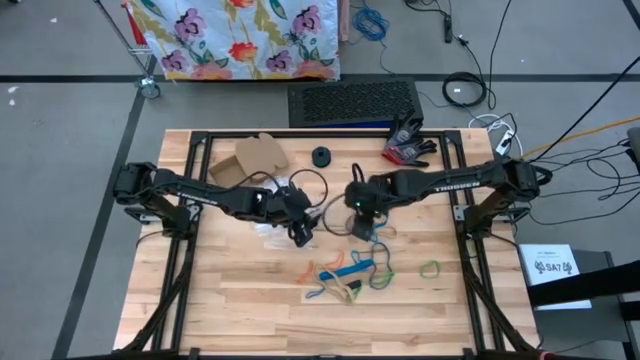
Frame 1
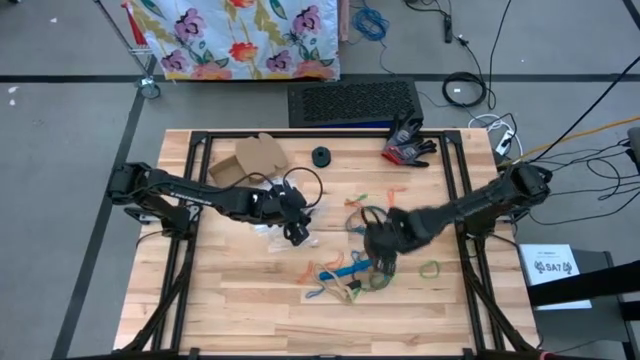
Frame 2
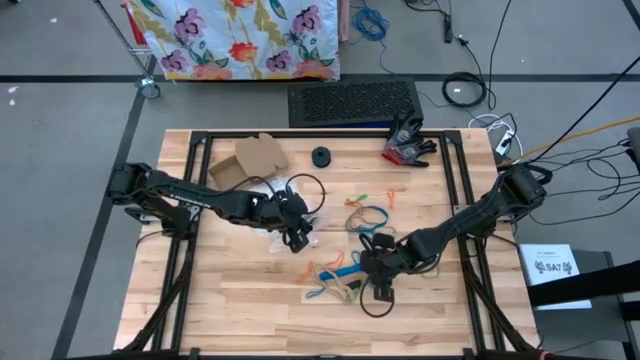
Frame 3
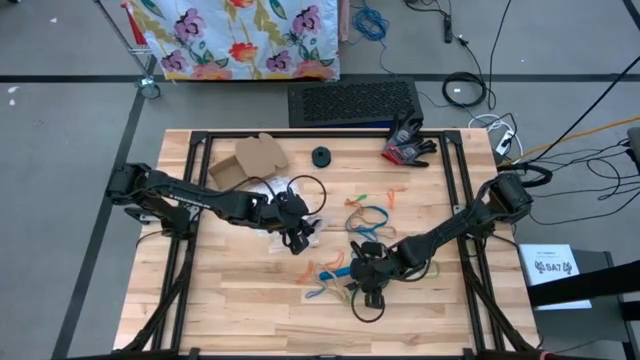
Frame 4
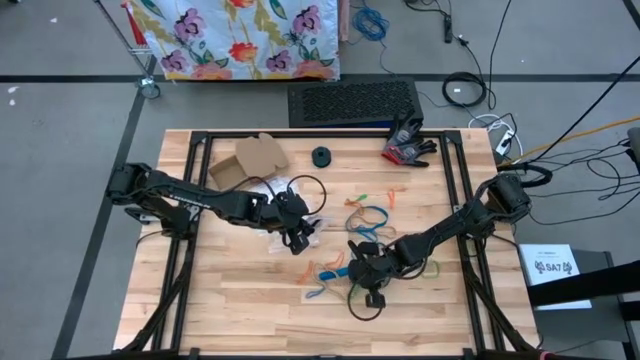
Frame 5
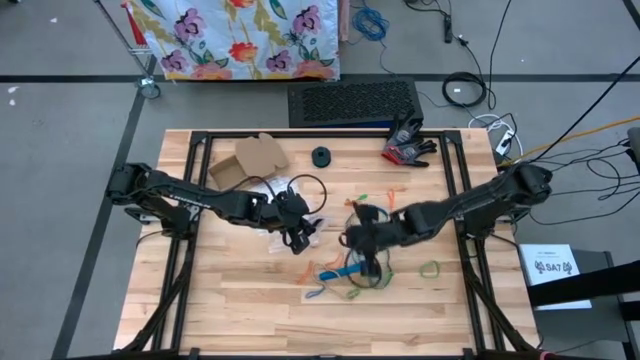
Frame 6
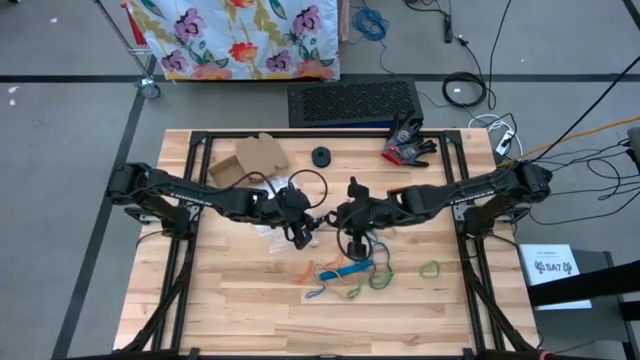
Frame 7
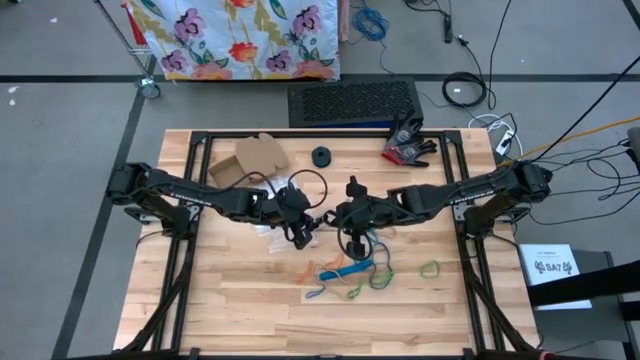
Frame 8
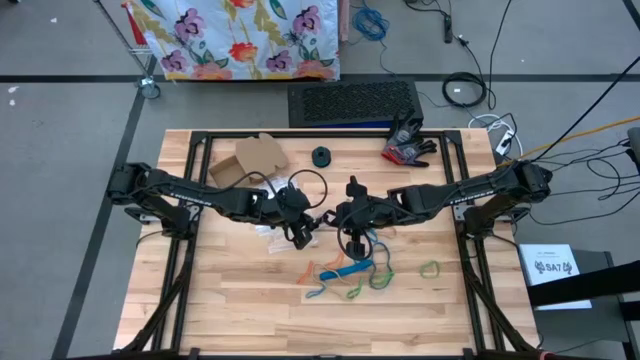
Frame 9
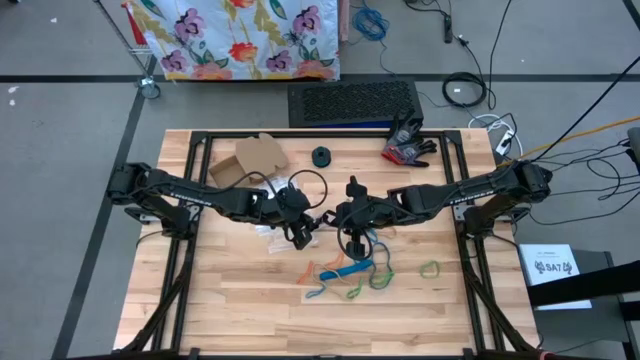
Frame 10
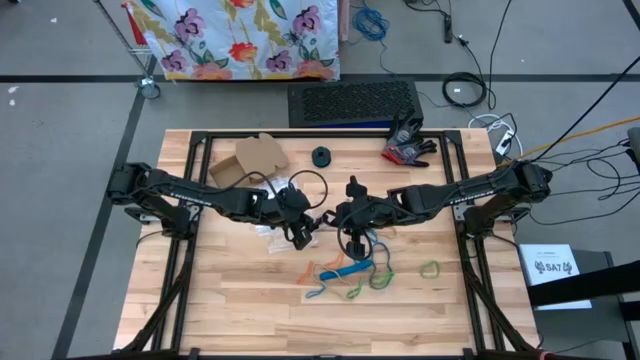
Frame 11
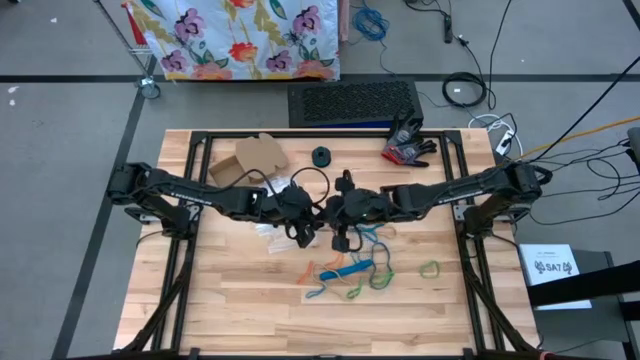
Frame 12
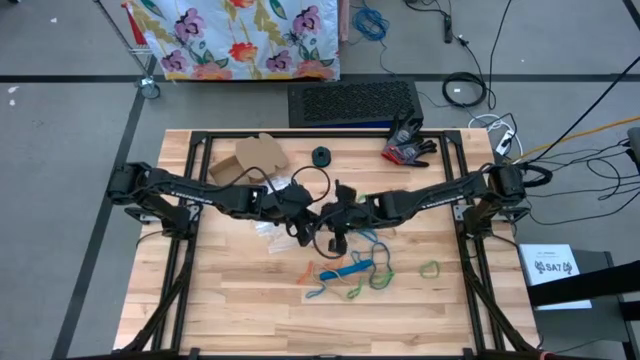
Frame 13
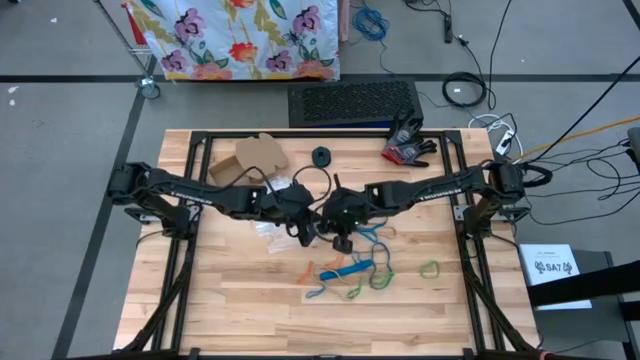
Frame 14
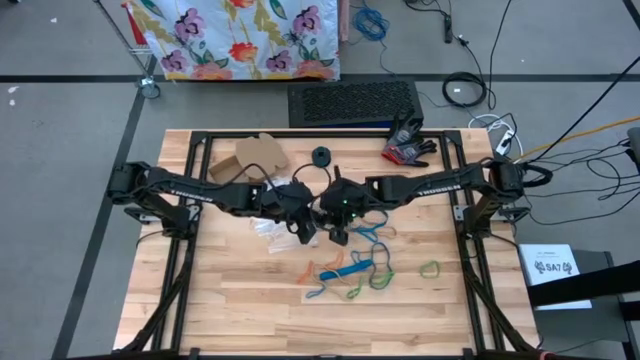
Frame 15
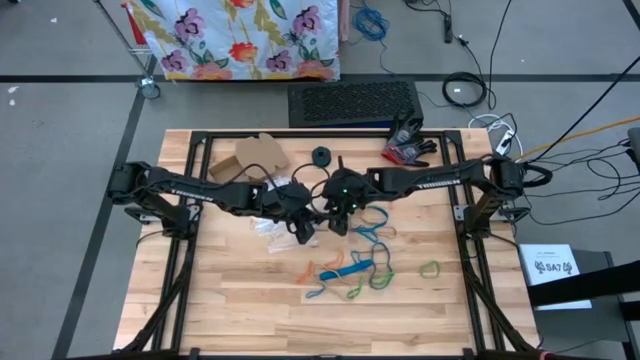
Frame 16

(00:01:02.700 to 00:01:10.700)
Task: Sort rubber bands
Put the black rubber band into the transparent zip bag

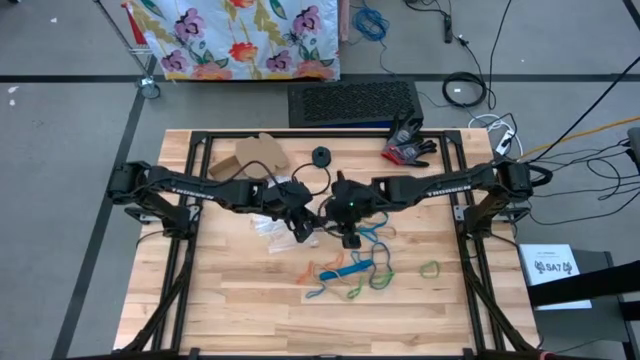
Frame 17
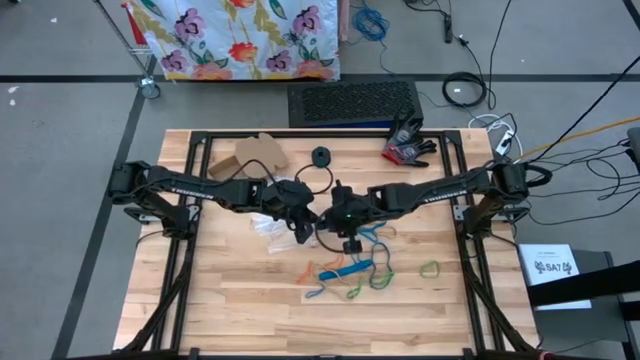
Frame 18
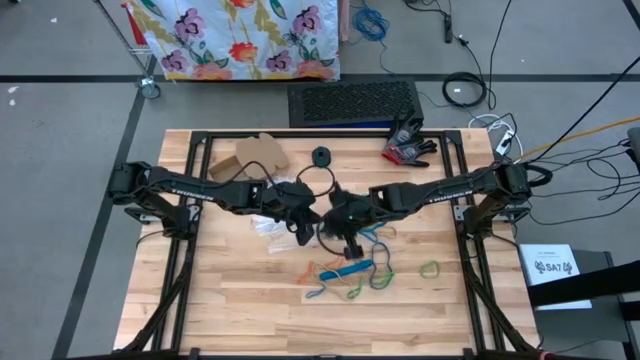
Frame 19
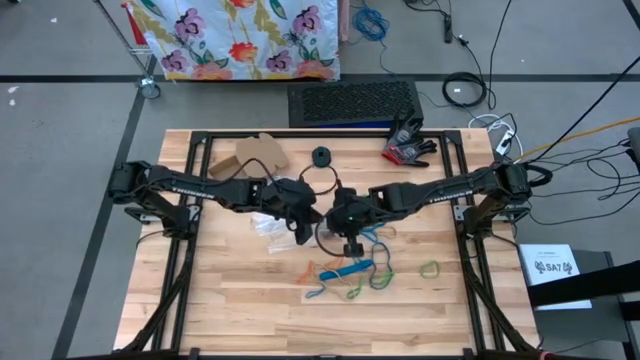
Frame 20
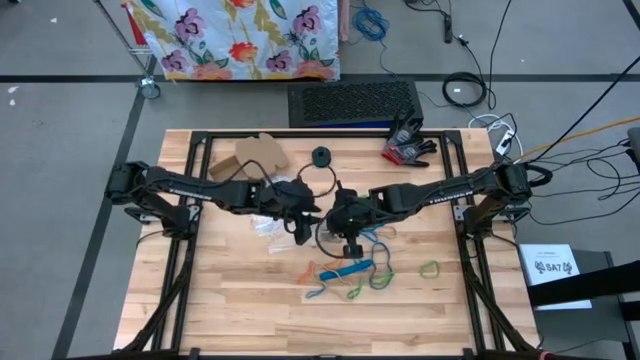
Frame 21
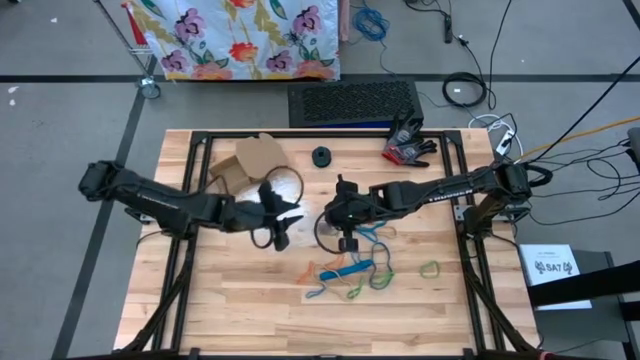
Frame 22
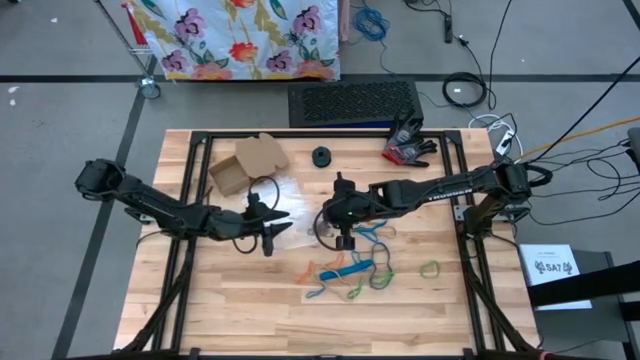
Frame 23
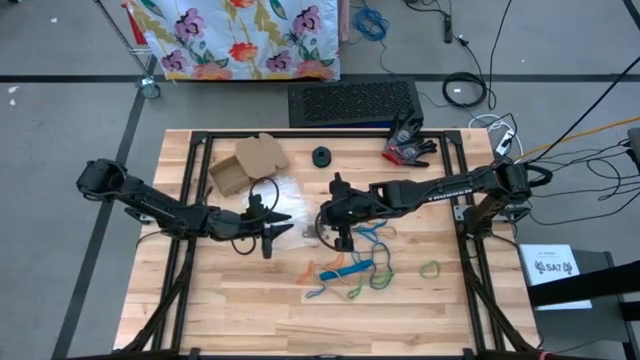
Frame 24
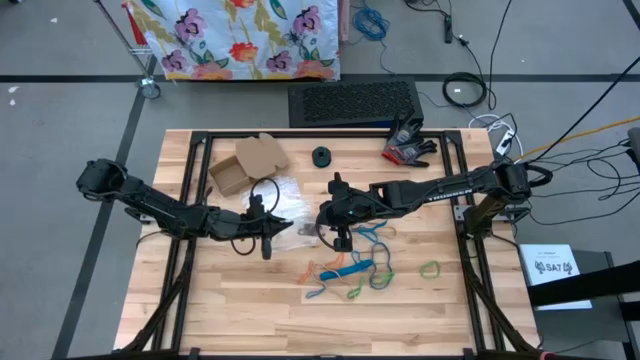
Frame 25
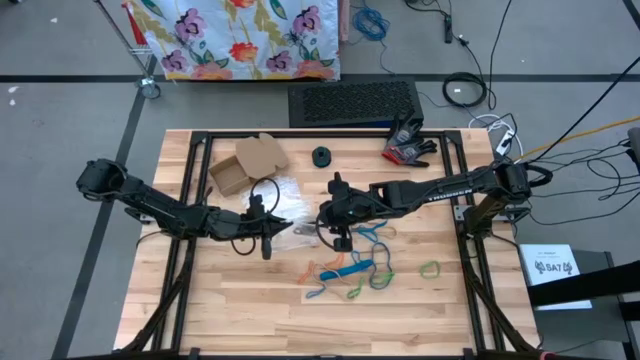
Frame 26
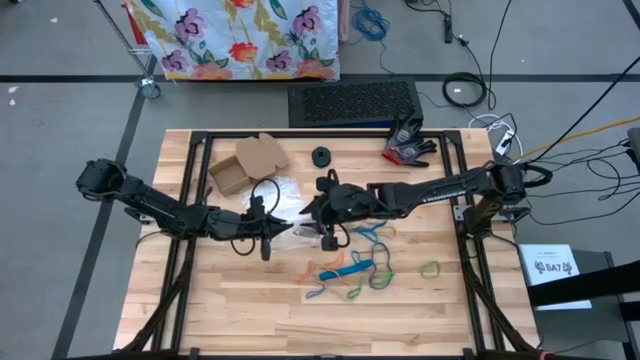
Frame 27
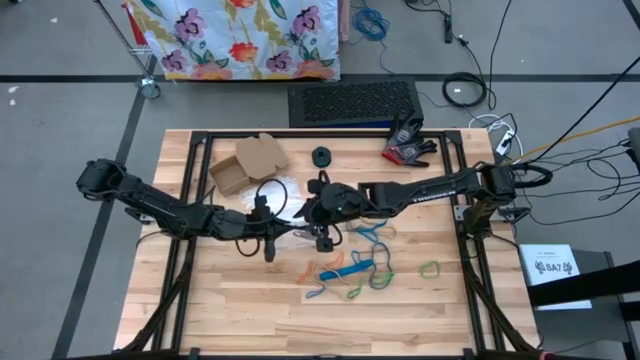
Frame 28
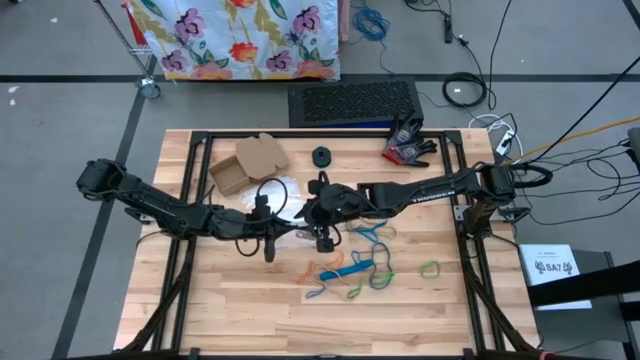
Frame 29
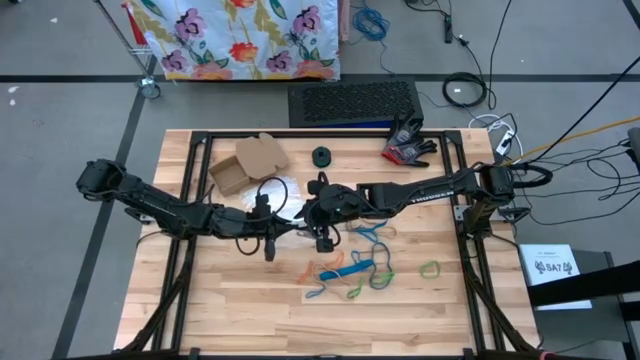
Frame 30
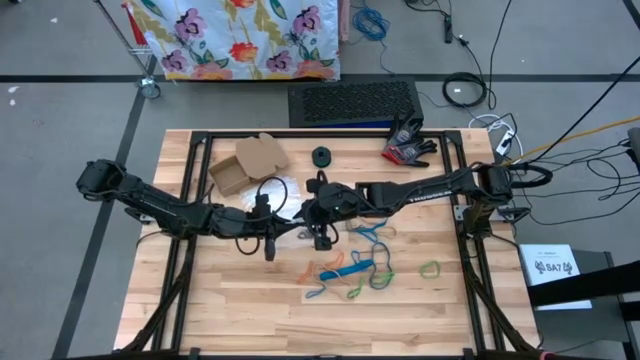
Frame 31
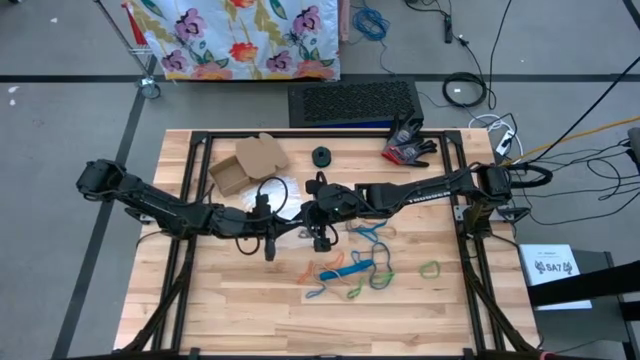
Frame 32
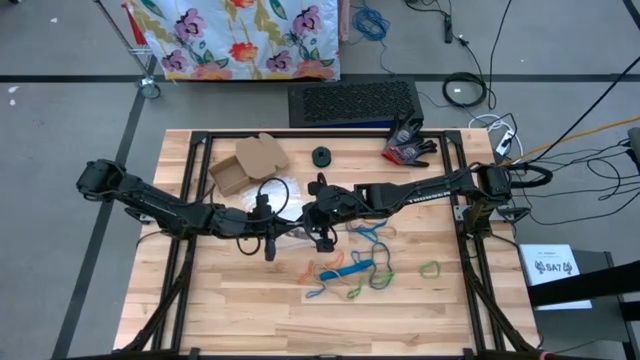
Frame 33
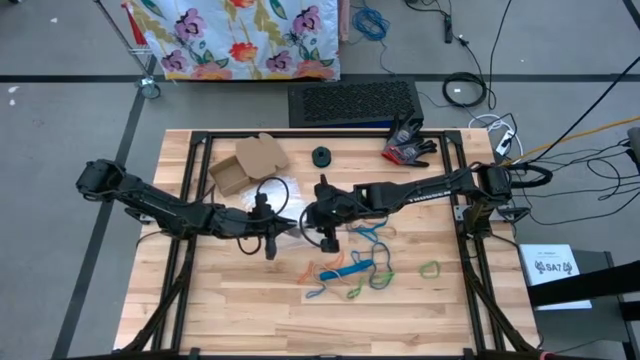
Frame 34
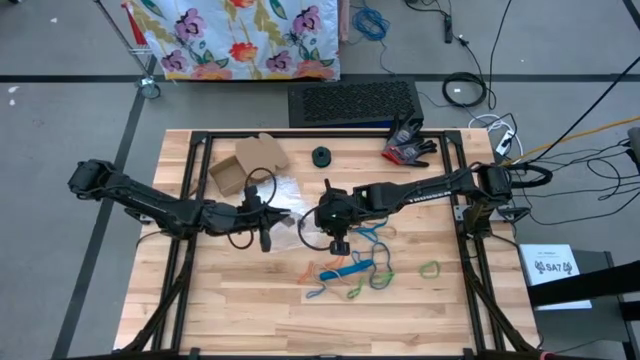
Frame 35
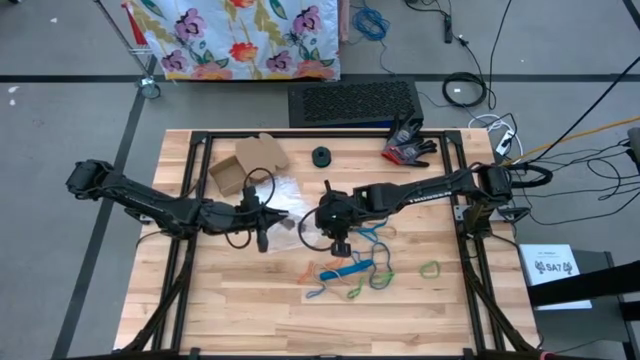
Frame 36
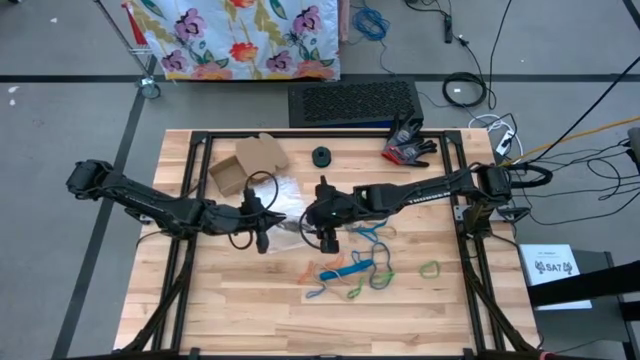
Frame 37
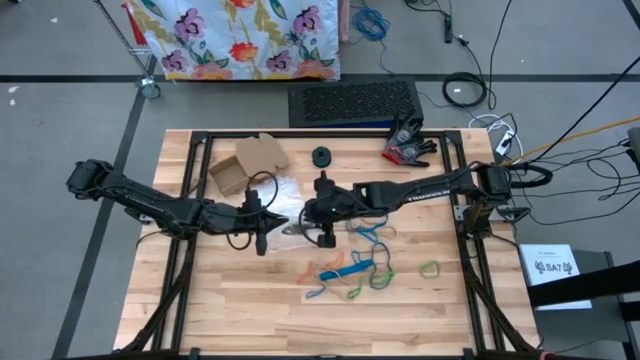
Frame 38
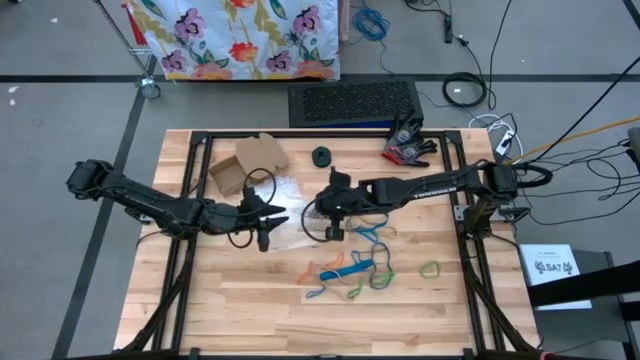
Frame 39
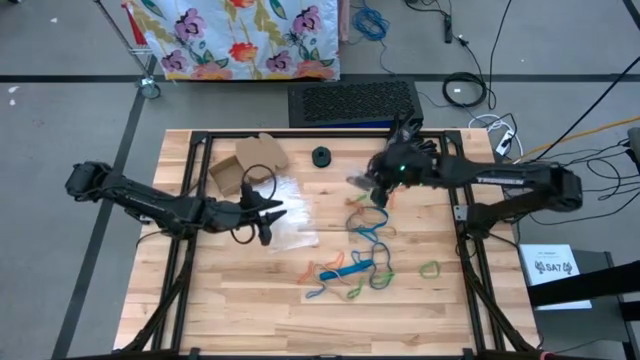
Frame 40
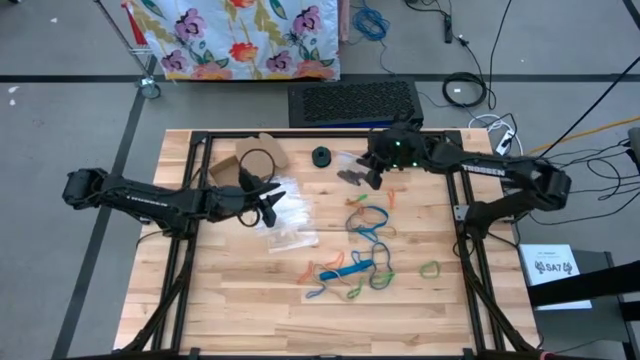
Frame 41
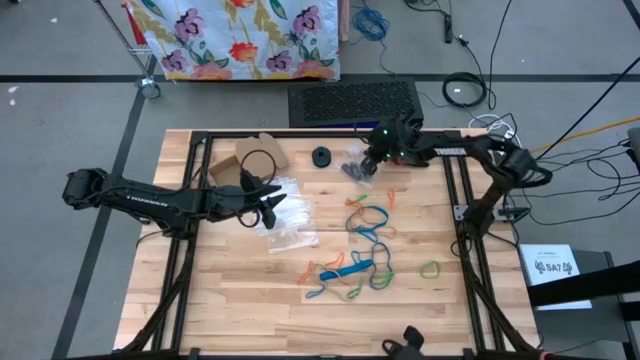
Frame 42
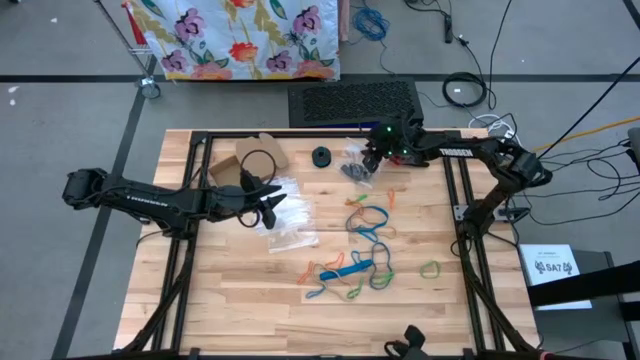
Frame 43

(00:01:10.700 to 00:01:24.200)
Close the transparent zip bag

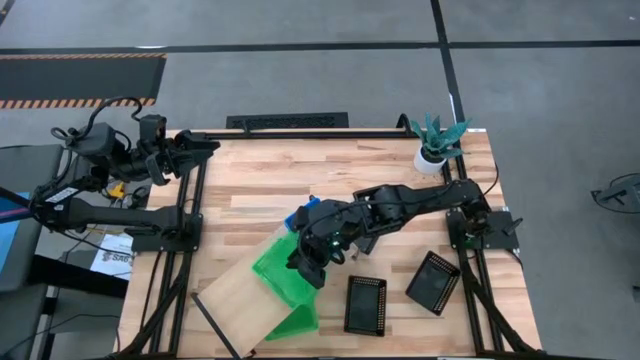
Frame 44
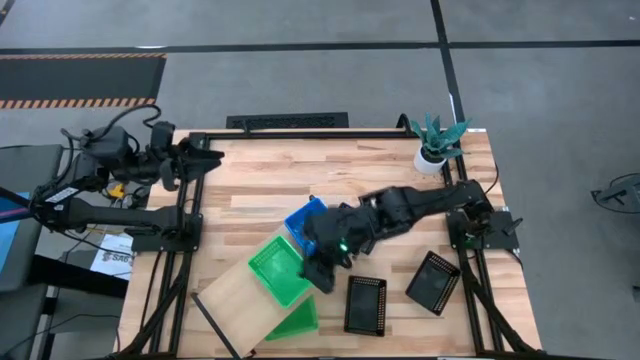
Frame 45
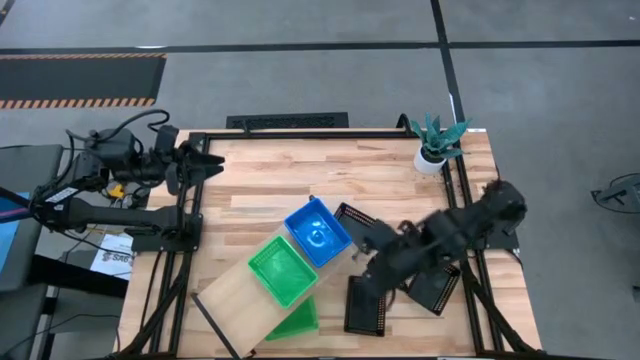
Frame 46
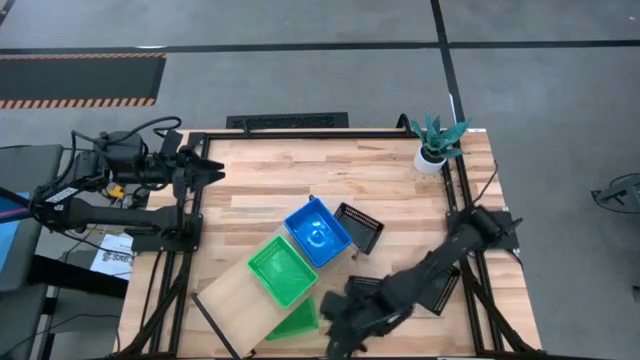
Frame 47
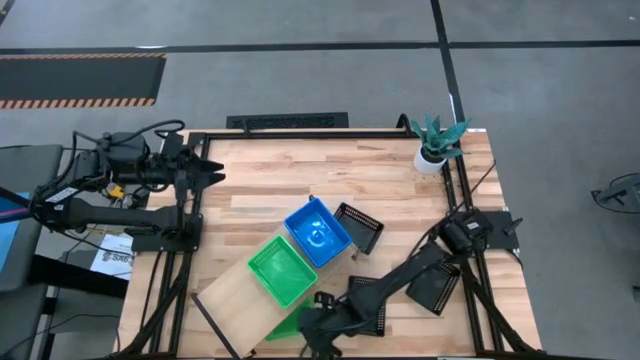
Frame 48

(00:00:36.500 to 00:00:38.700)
Task: Stack baskets on shelf by color
Stack the green bin on the green bin on the shelf
